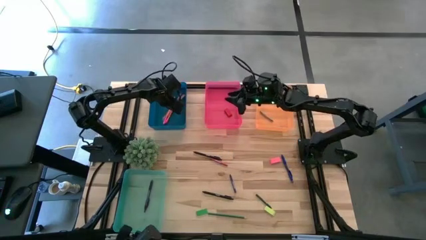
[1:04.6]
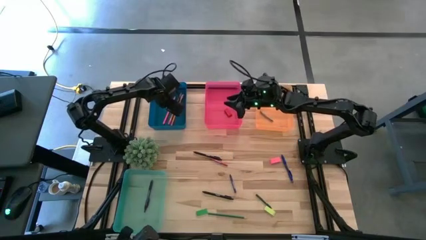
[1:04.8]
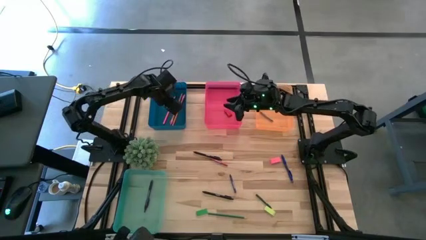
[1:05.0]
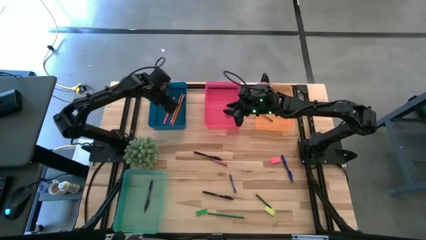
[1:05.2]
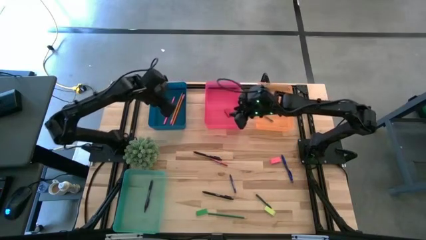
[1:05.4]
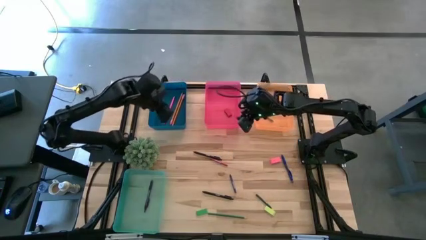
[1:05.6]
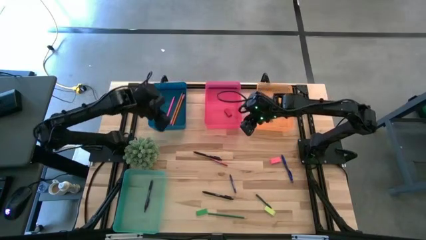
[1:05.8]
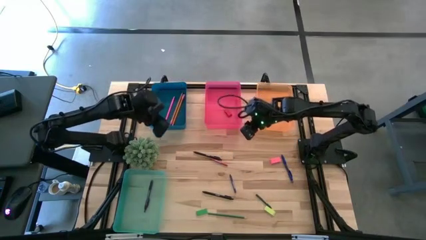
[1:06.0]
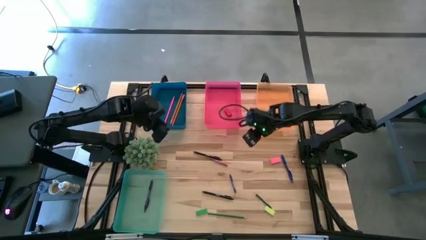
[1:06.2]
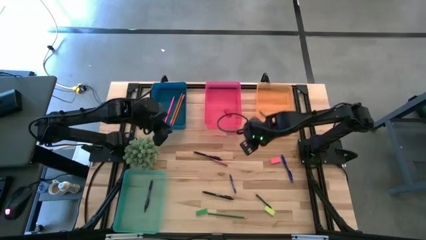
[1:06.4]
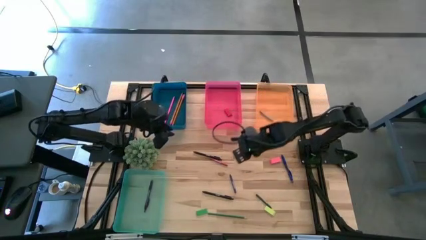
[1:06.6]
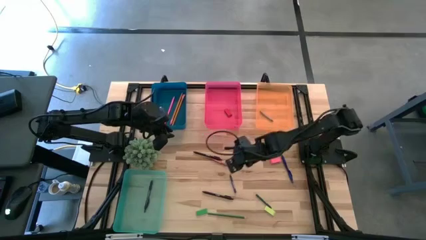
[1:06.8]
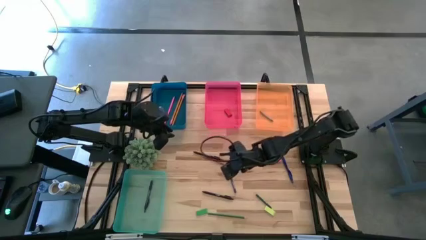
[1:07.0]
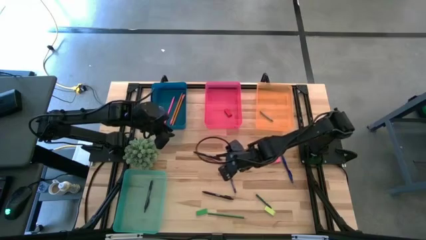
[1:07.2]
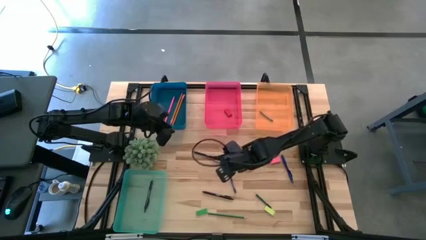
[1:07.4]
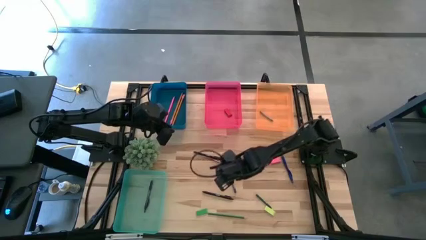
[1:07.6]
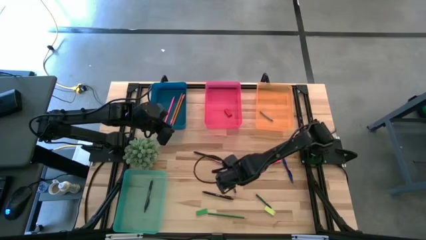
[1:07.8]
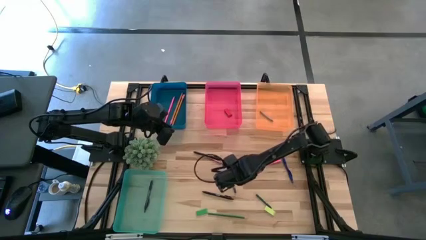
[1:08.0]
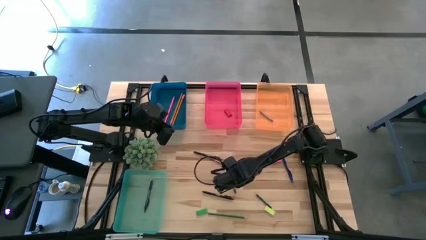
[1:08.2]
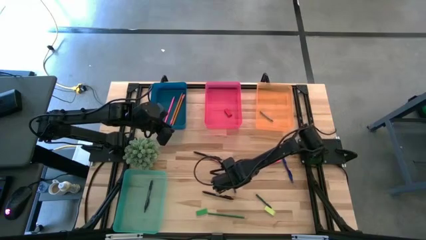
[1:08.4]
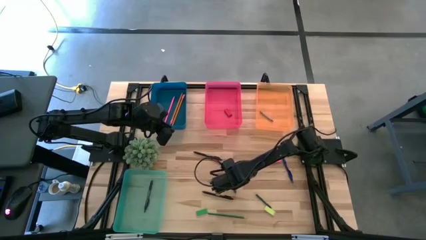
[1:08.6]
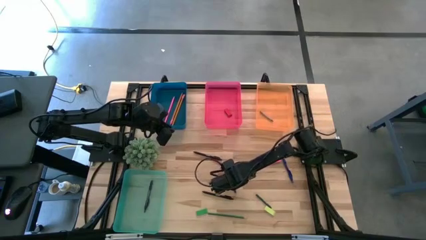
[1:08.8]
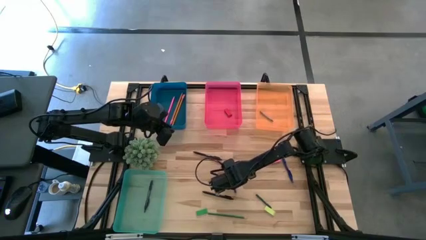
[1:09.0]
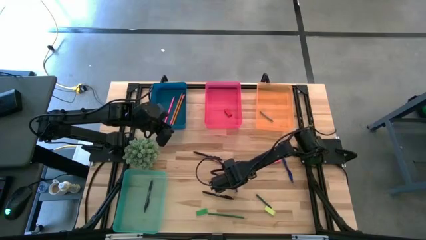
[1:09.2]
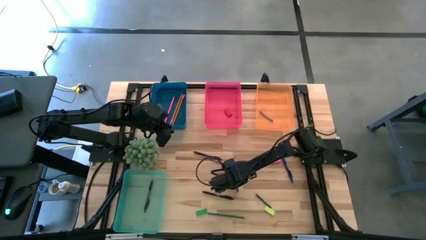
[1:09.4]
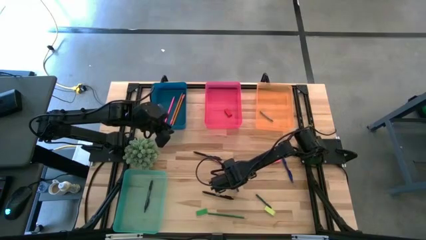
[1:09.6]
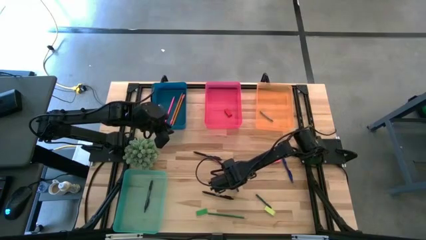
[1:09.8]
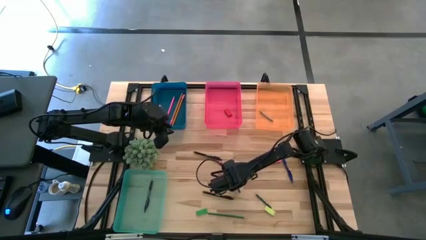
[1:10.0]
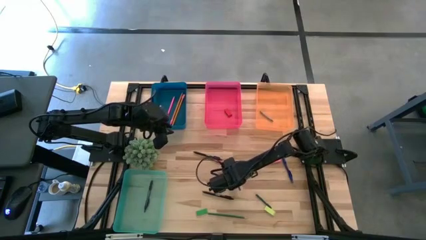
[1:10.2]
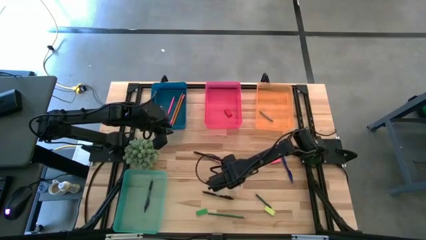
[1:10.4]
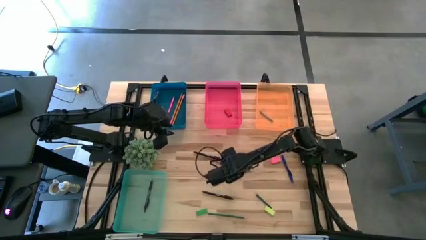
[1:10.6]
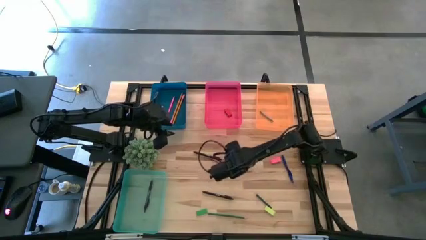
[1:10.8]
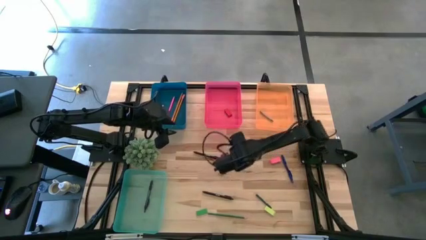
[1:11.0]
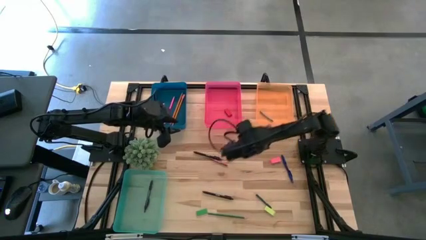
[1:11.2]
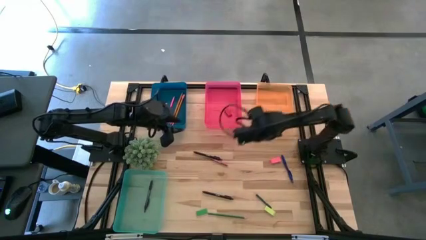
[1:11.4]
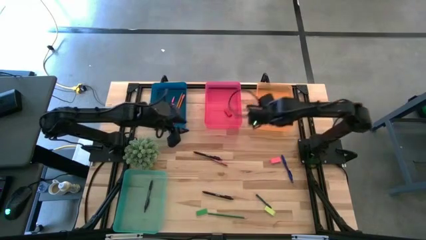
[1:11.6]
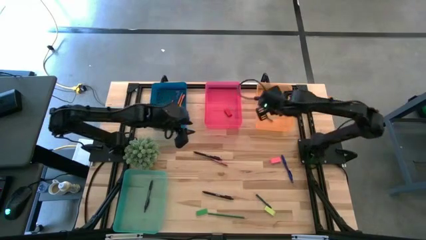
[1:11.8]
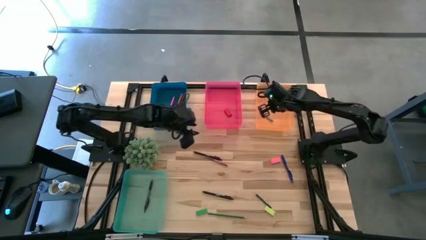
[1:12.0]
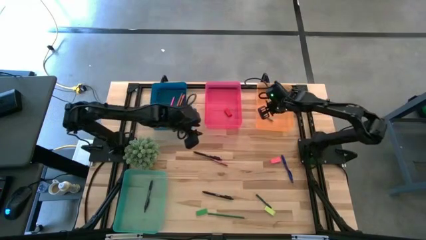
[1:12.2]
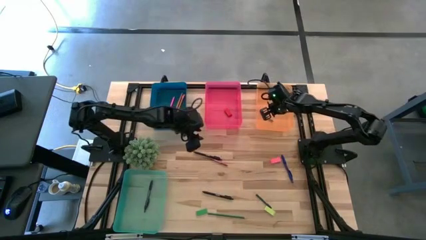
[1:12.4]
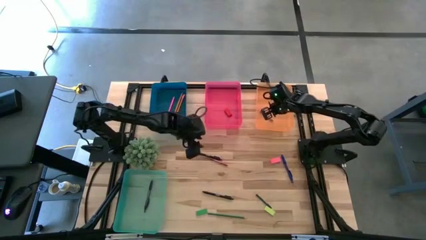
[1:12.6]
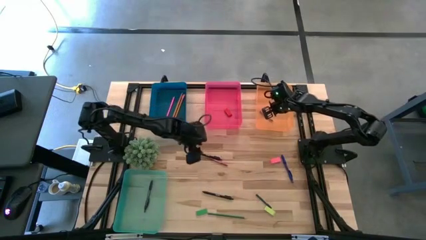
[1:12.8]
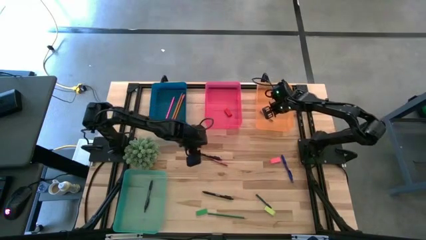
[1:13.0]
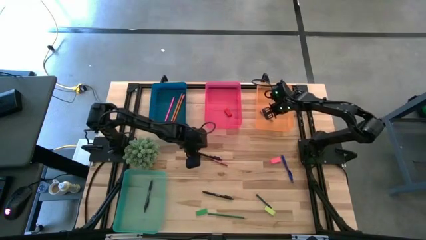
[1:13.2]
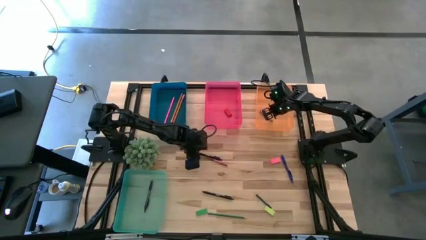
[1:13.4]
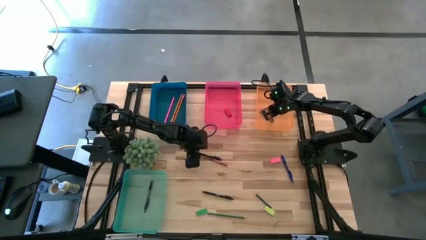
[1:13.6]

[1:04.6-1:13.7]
Task: Sort crayons/erasers/pens/pencils in bins
Put the dark blue crayon into the orange bin

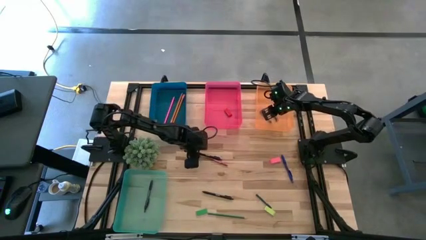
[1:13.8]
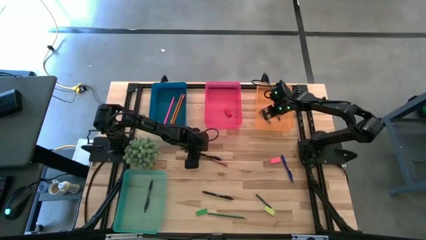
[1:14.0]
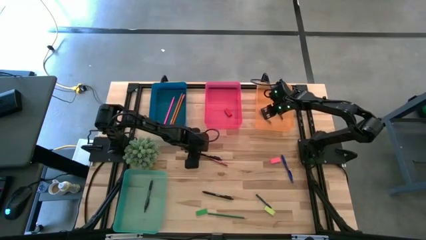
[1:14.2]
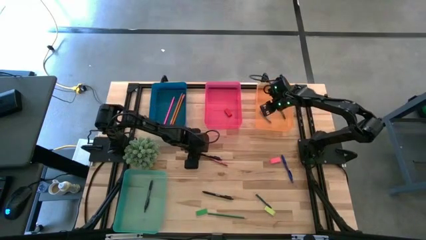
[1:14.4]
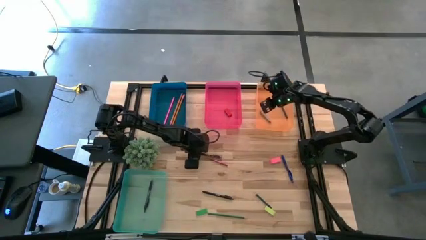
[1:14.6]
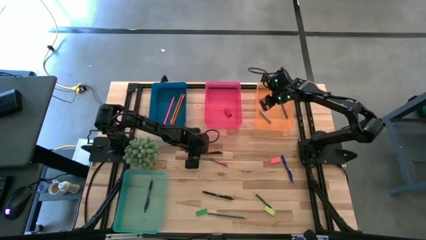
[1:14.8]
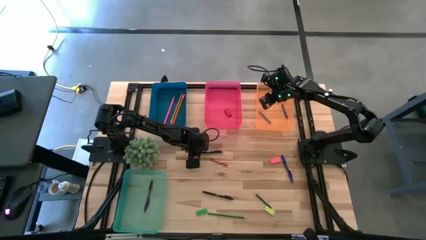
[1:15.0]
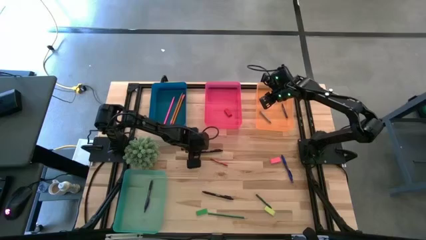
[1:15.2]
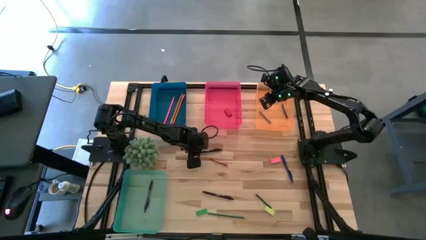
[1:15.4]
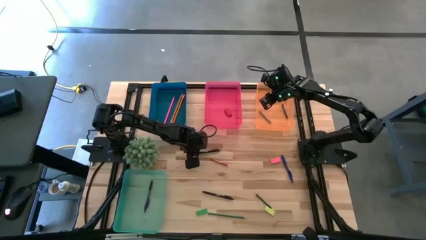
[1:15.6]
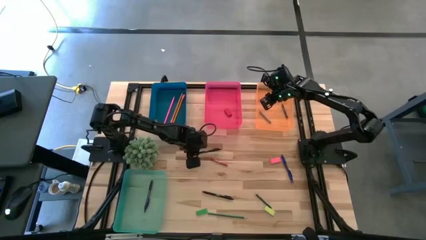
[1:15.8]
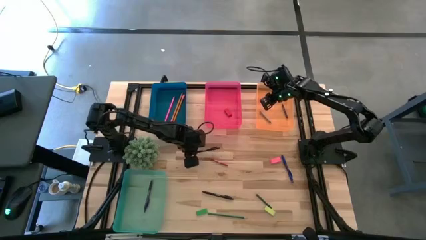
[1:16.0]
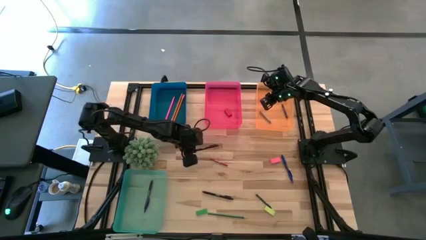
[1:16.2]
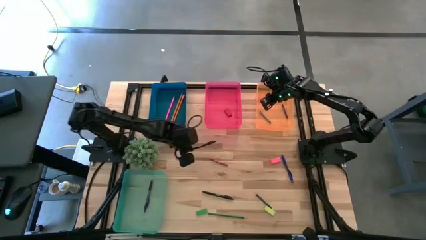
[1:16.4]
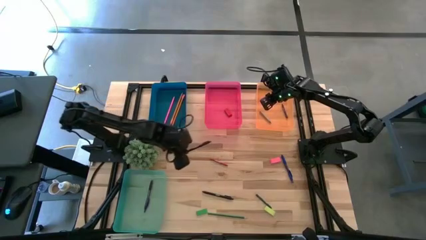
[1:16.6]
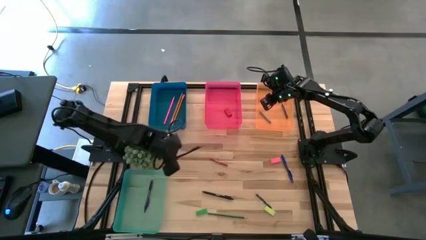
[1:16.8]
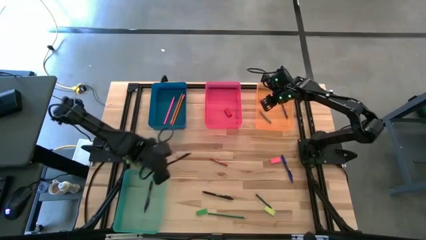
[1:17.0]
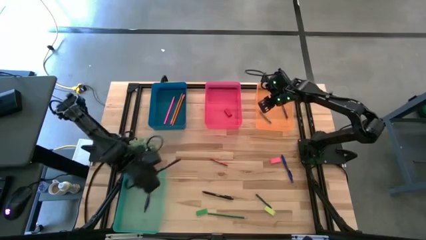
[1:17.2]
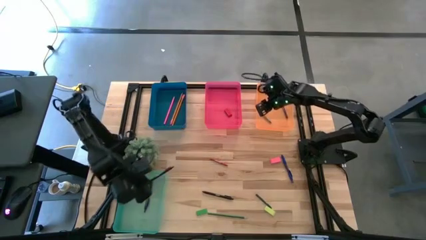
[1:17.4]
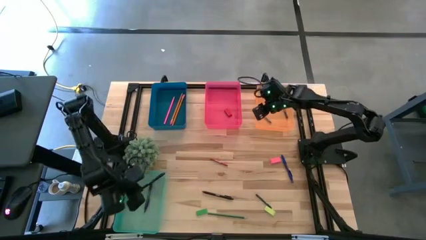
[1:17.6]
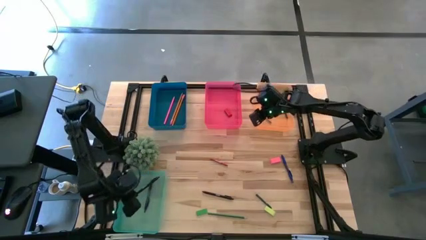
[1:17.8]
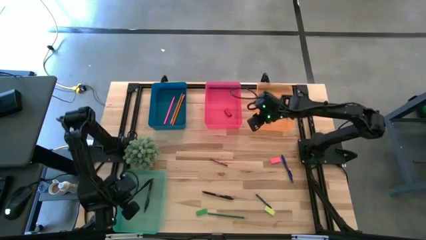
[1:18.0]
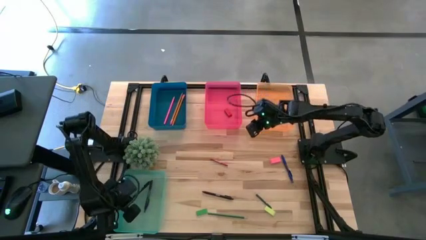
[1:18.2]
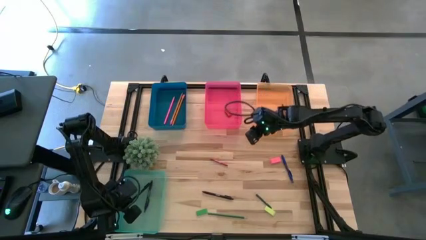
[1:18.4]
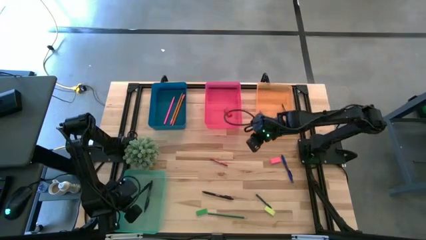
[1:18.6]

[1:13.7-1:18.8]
Put the black pencil into the green bin

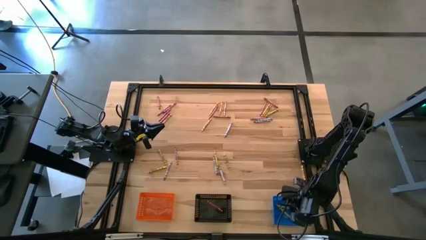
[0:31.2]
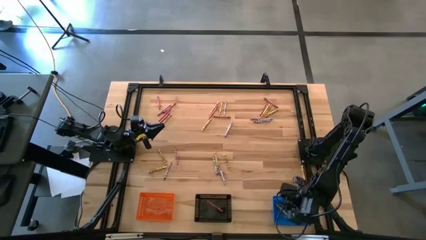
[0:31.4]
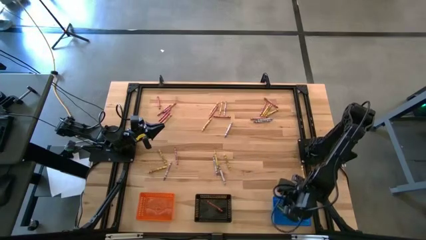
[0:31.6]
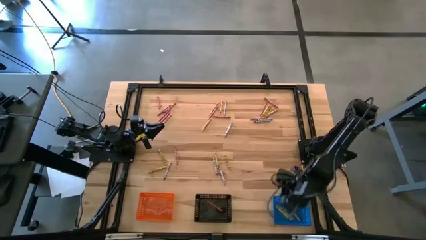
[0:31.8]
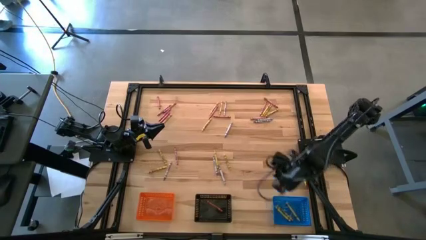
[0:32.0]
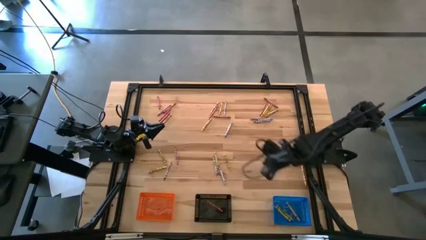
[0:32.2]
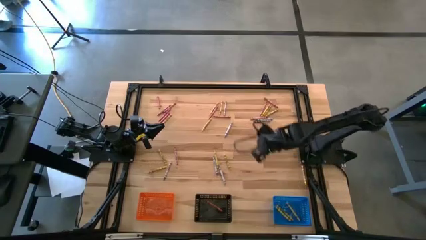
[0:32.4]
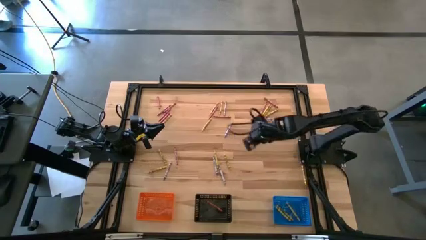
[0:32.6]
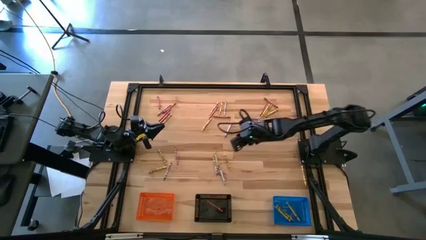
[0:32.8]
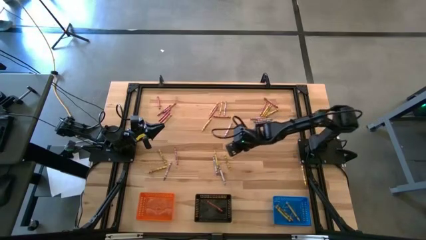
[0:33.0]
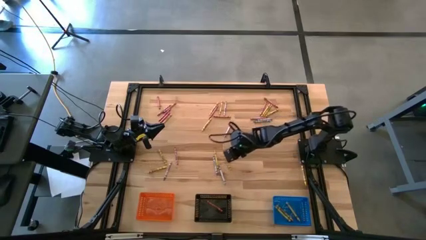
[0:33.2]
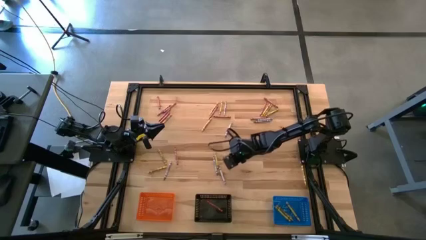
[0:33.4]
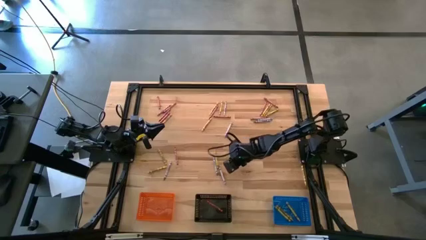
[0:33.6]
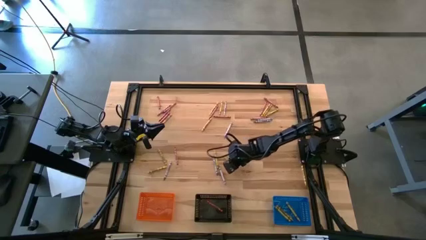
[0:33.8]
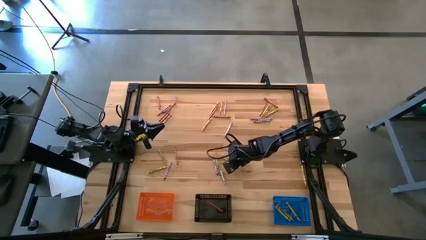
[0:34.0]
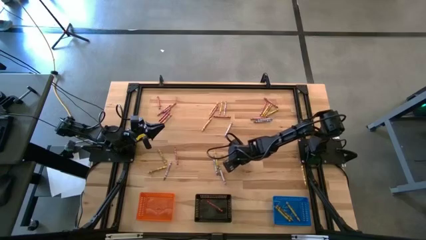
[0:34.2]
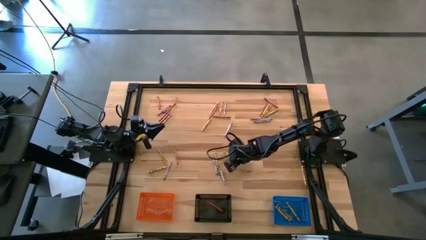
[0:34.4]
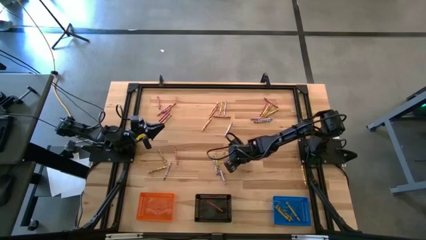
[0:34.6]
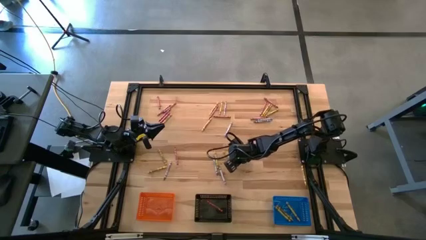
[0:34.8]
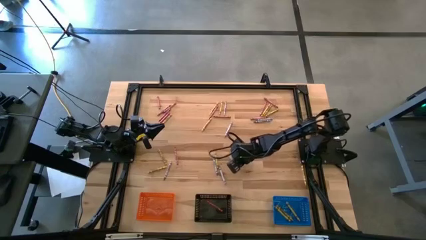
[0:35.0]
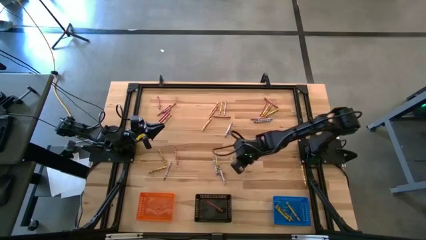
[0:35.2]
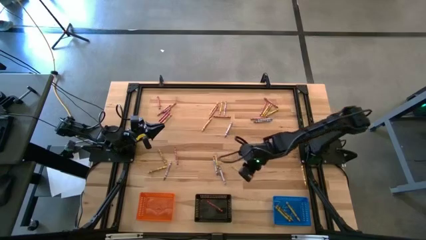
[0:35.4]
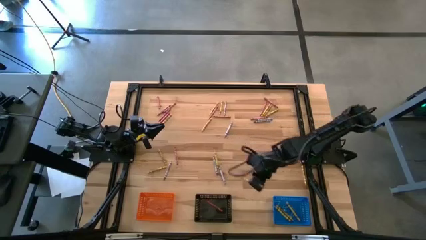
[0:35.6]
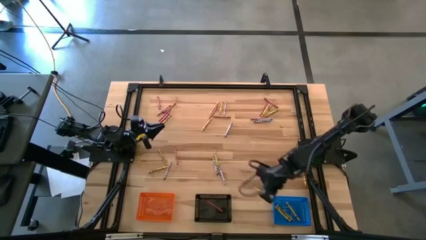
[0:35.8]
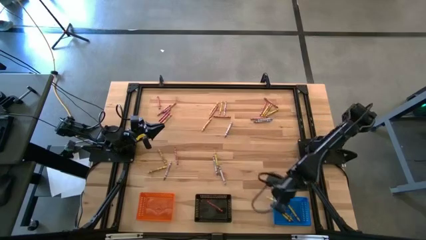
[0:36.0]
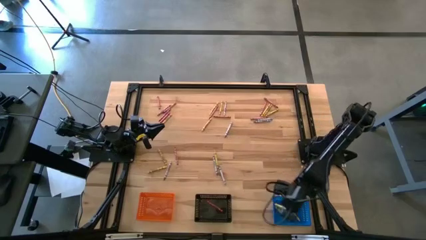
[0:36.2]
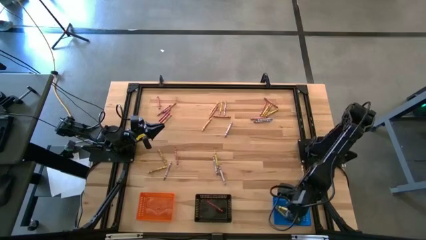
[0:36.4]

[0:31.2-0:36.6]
Task: Sort crayons
Put the yellow crayon into the blue bin
